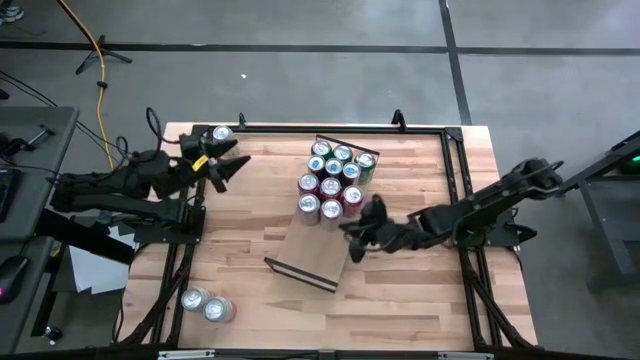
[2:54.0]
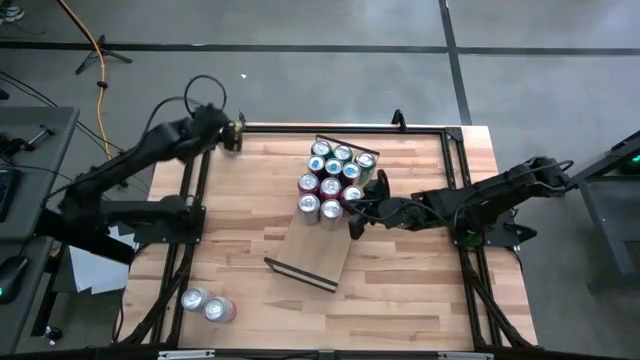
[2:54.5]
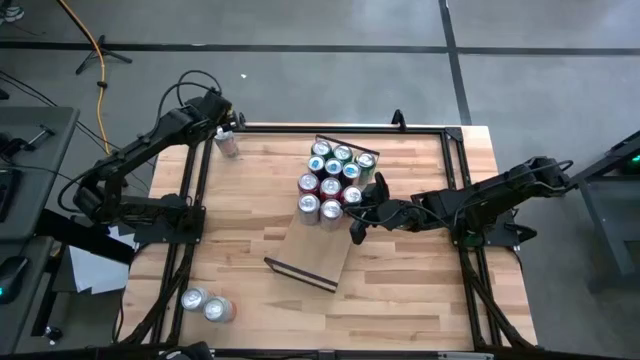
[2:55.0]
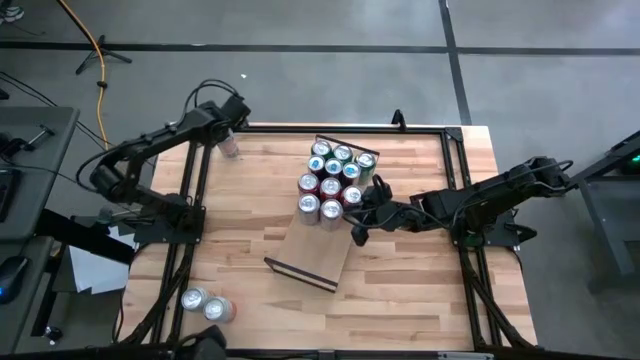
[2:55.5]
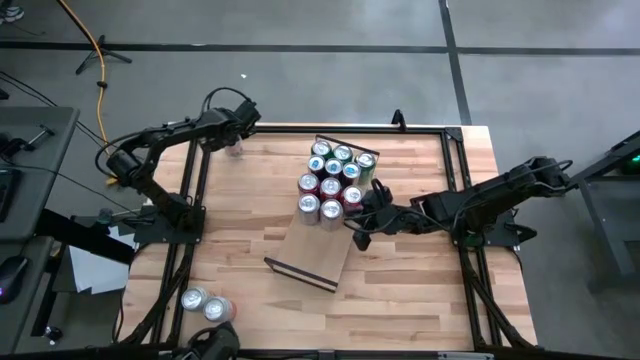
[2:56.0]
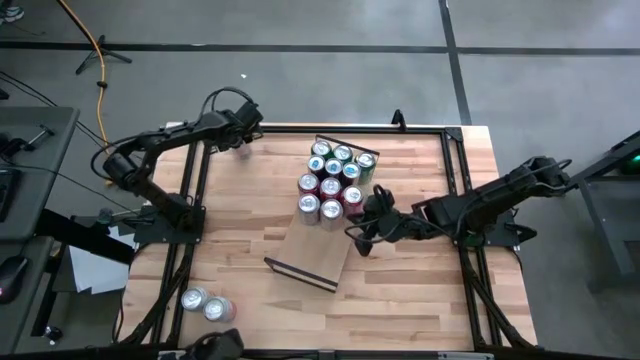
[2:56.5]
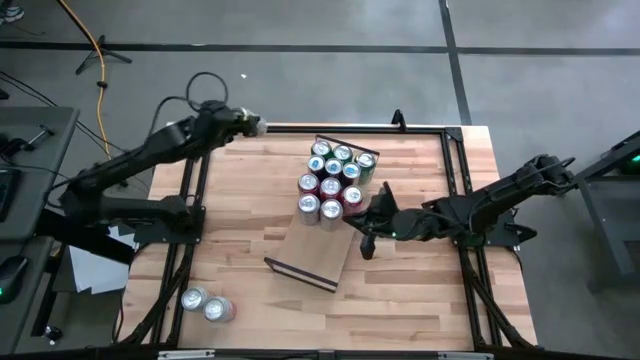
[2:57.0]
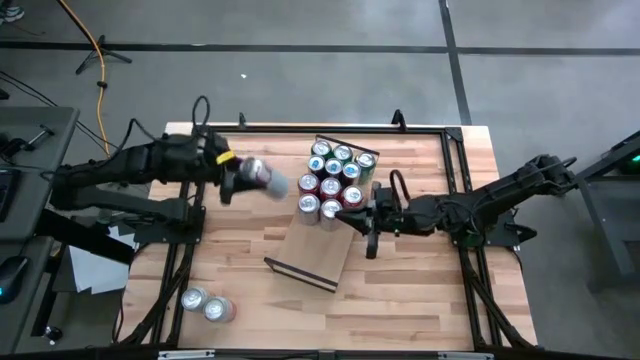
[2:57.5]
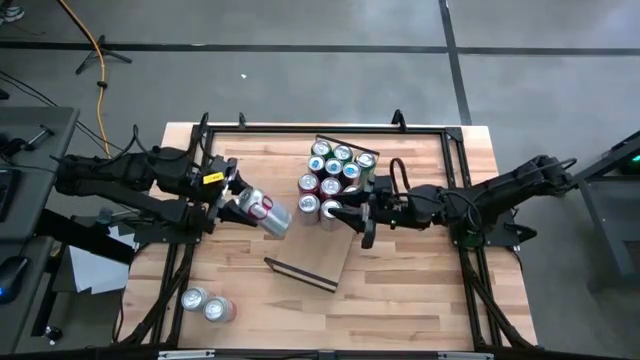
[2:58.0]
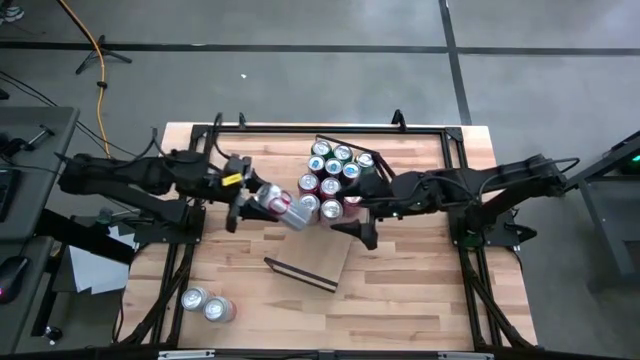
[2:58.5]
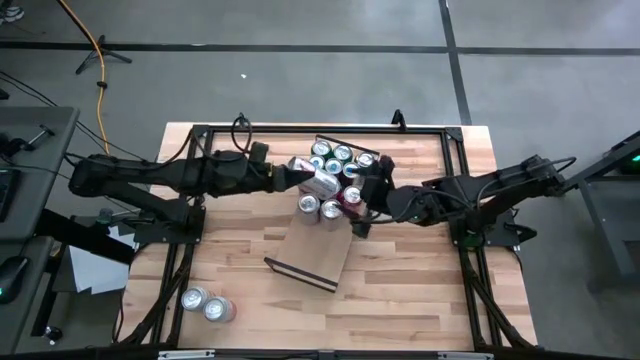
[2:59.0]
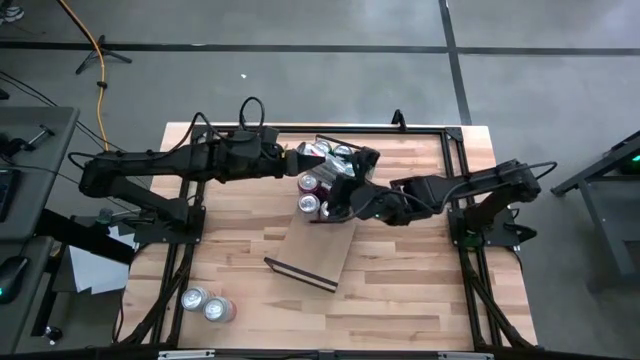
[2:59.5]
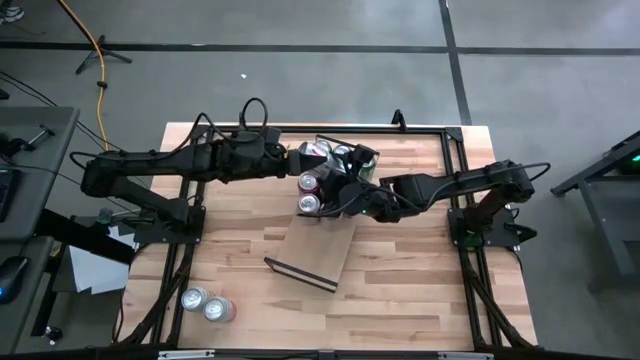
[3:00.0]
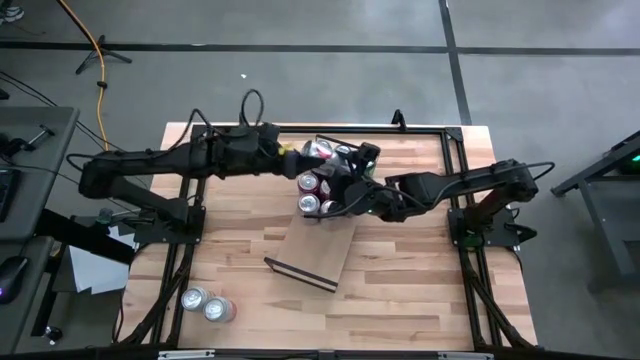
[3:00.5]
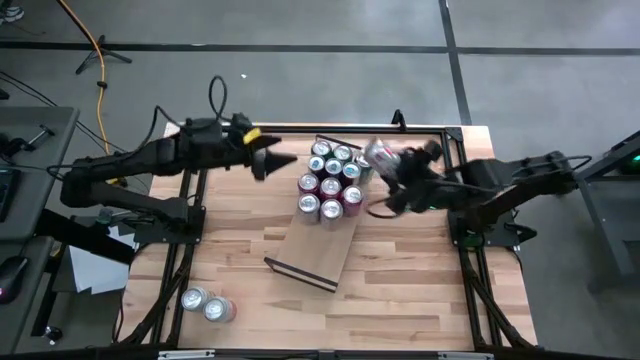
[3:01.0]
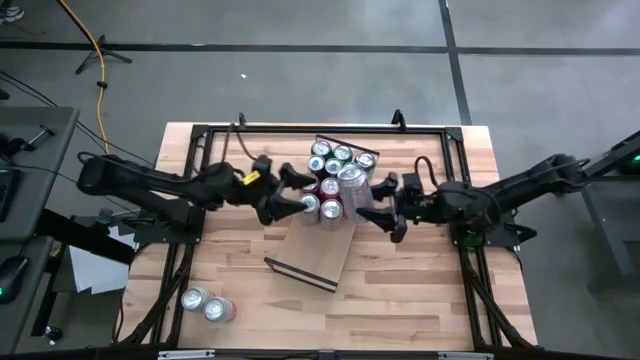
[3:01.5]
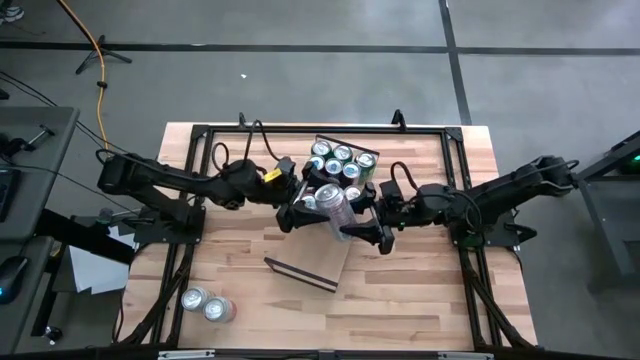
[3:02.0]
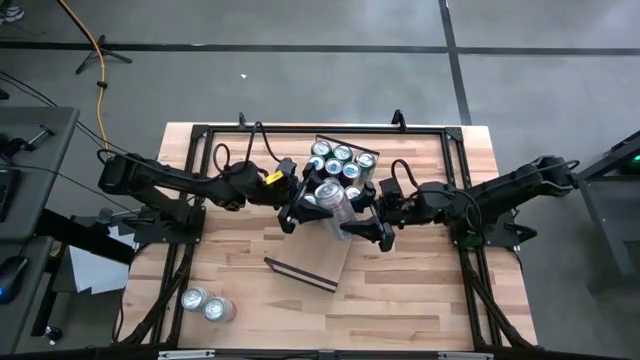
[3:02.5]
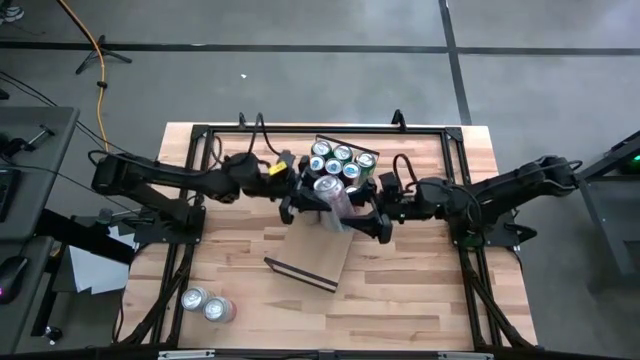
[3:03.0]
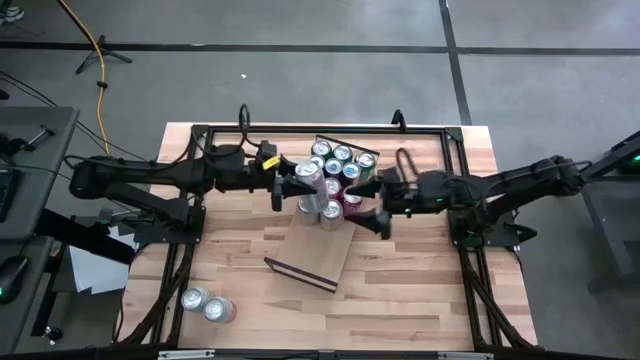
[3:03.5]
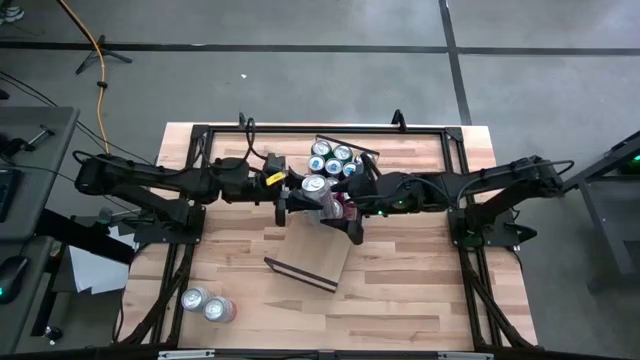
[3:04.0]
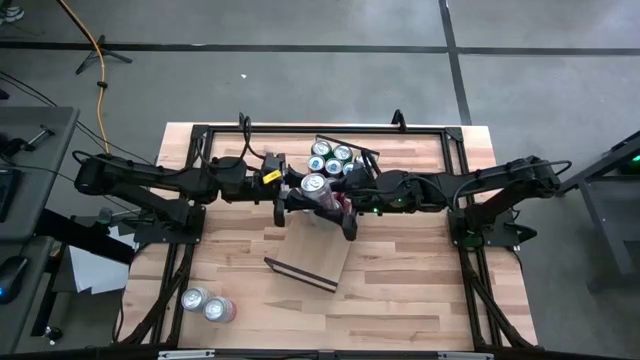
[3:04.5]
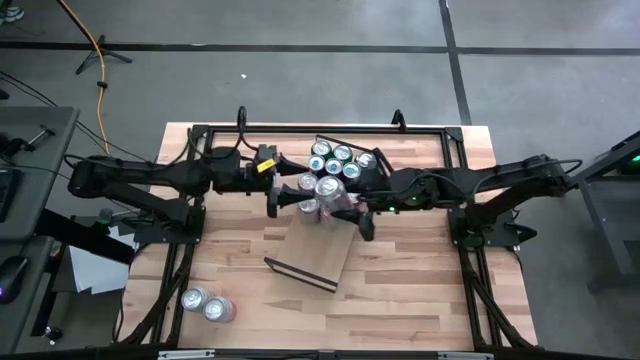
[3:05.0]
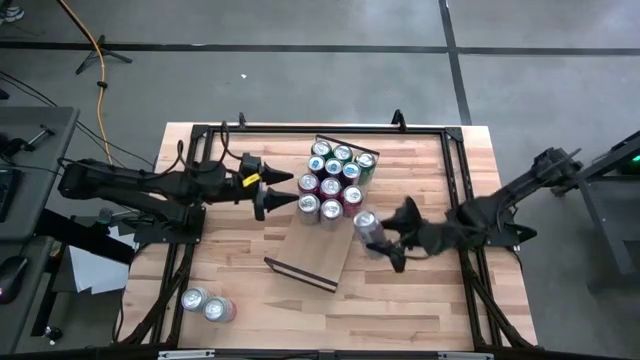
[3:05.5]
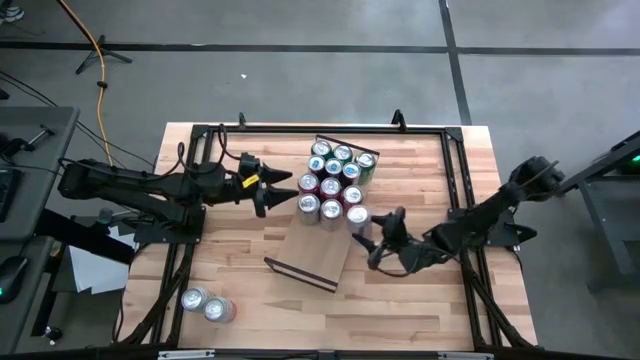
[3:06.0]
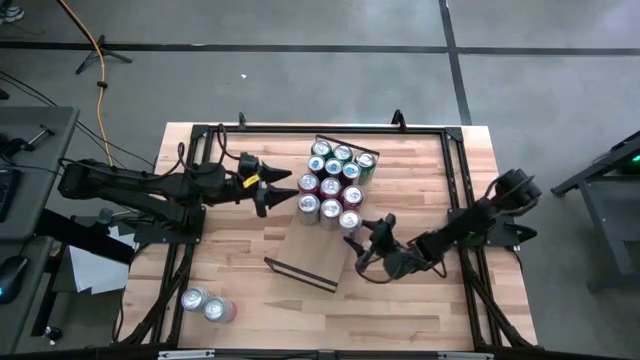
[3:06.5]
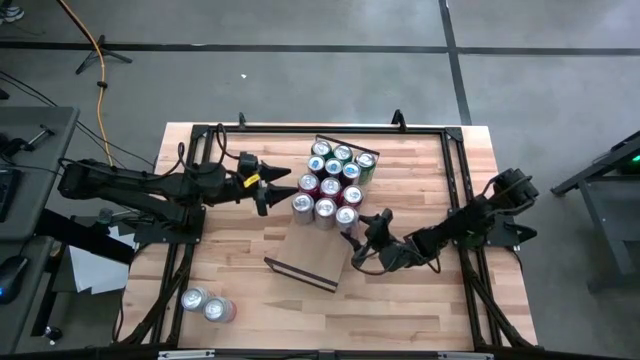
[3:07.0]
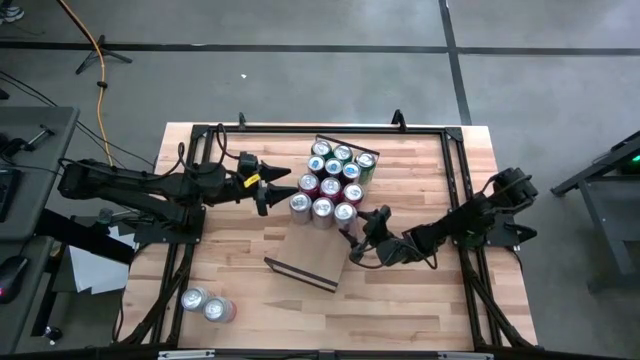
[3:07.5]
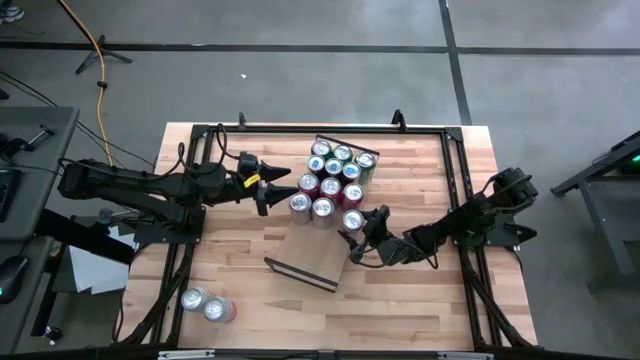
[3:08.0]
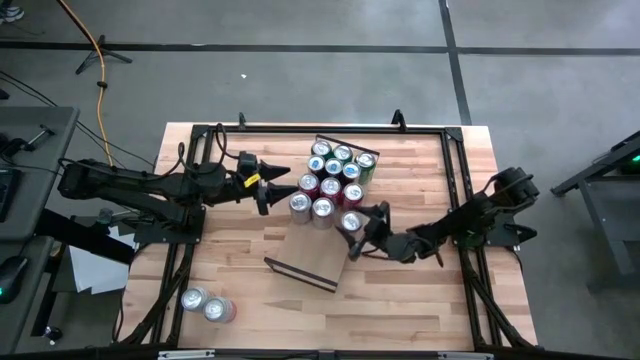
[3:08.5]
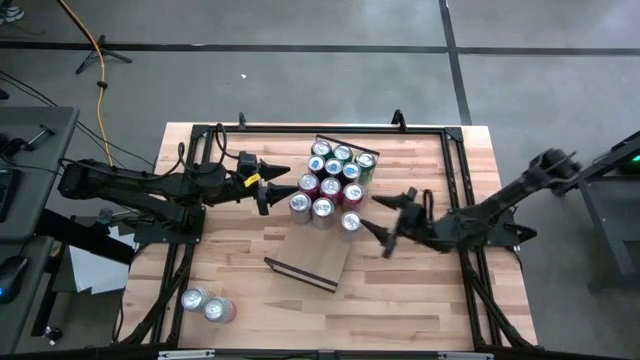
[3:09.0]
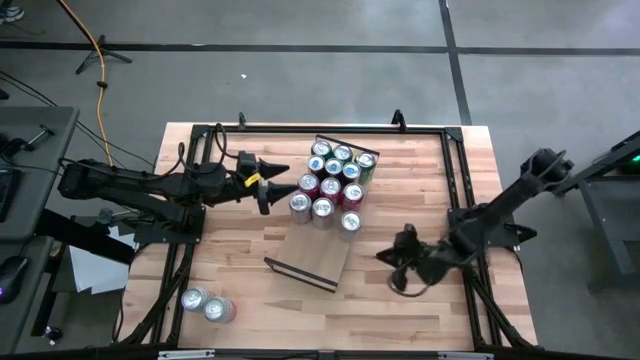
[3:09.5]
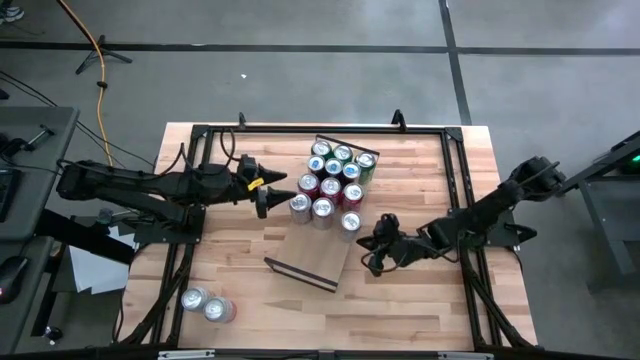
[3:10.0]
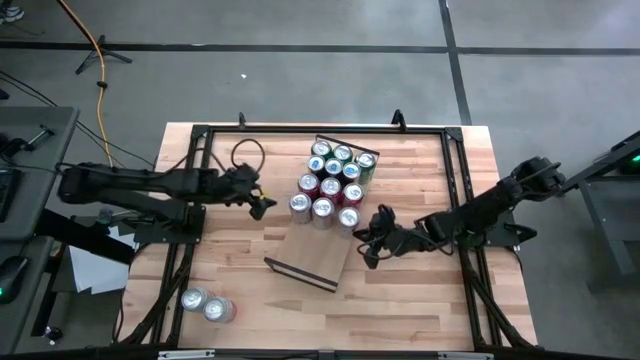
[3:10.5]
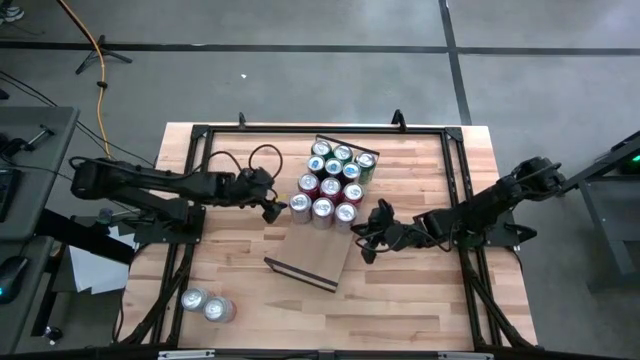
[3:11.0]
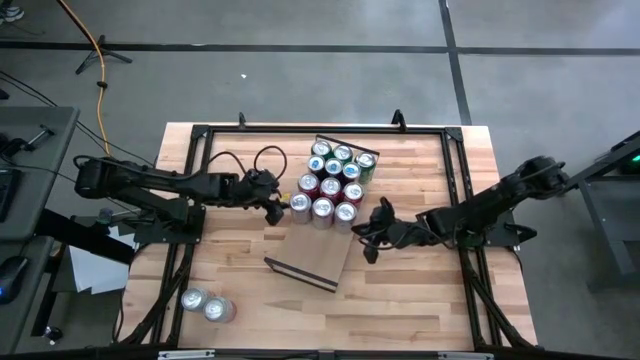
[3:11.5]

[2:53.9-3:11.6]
Task: Place canned beverage on shelf
Put the red and silver soda can on the shelf aligned with the other red and silver soda can
